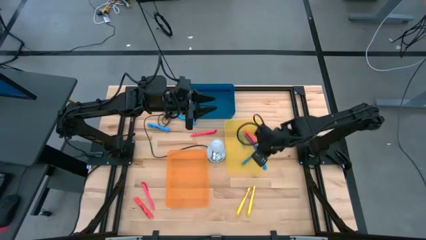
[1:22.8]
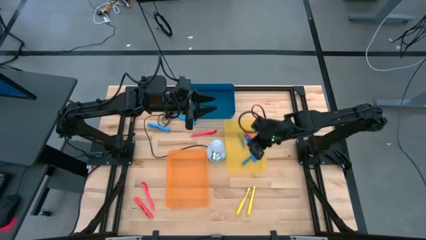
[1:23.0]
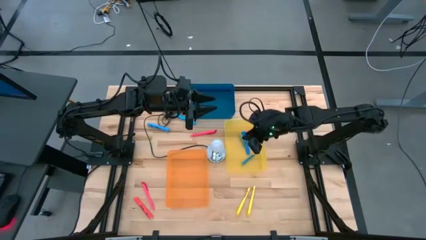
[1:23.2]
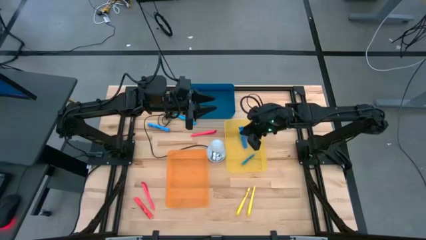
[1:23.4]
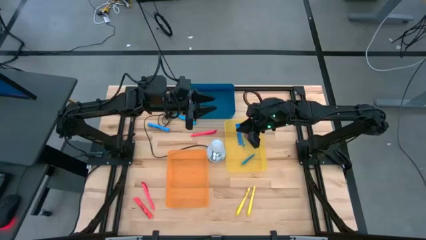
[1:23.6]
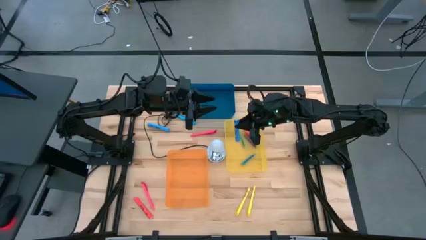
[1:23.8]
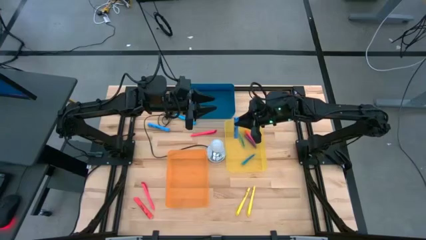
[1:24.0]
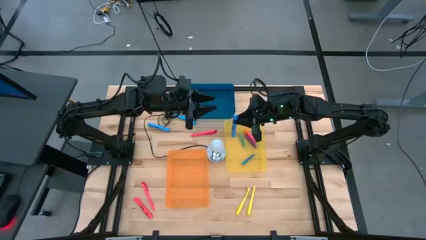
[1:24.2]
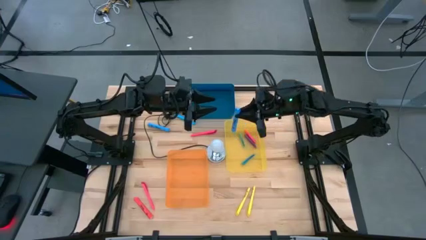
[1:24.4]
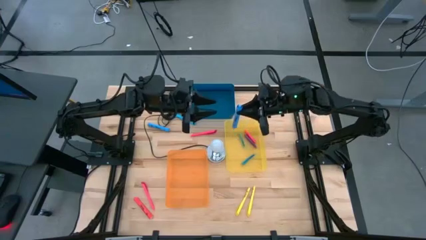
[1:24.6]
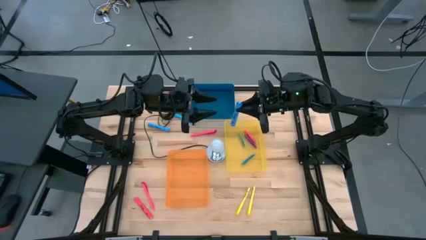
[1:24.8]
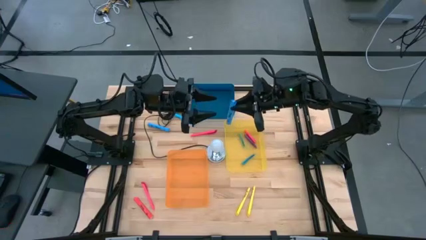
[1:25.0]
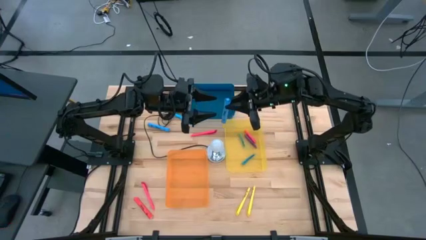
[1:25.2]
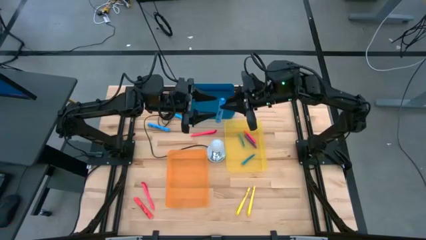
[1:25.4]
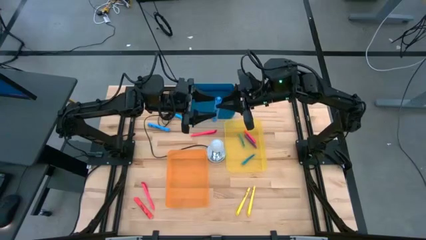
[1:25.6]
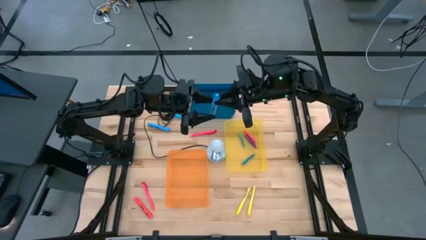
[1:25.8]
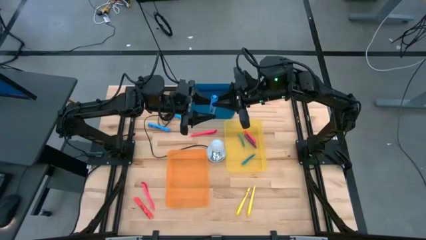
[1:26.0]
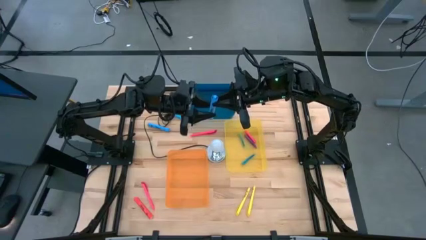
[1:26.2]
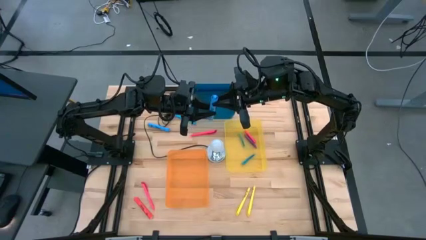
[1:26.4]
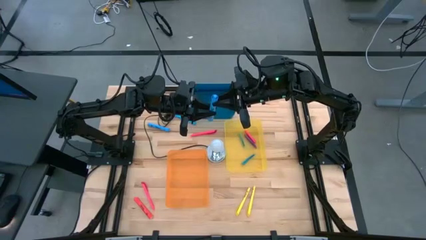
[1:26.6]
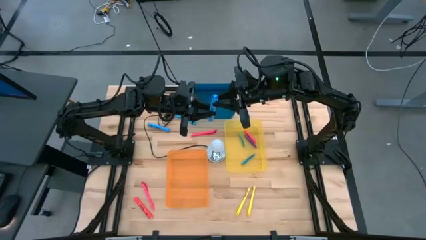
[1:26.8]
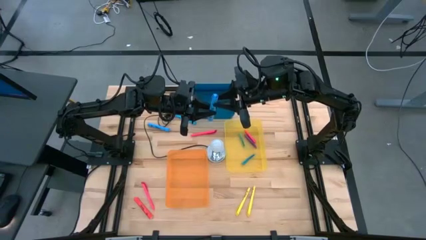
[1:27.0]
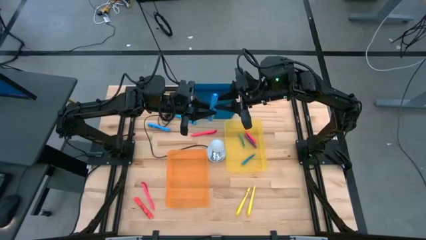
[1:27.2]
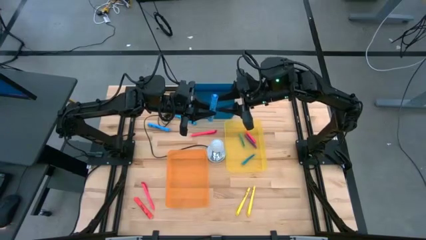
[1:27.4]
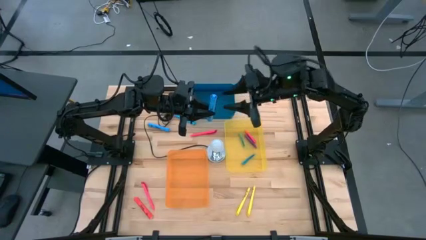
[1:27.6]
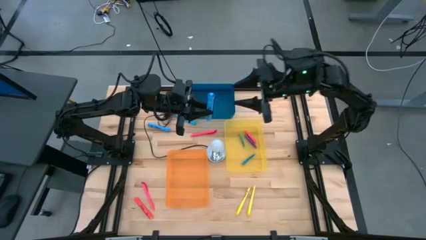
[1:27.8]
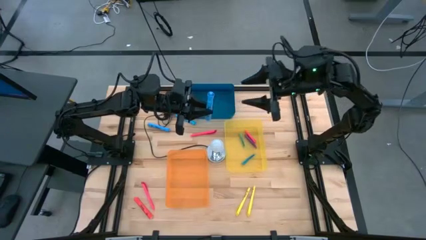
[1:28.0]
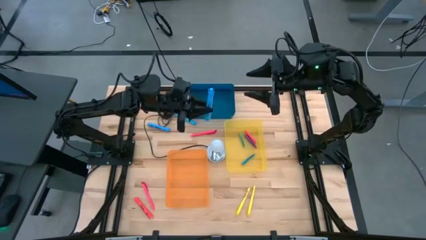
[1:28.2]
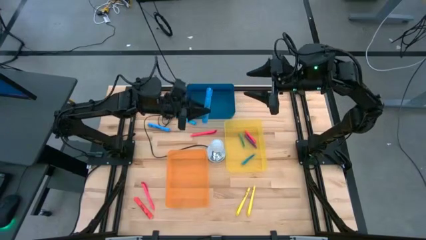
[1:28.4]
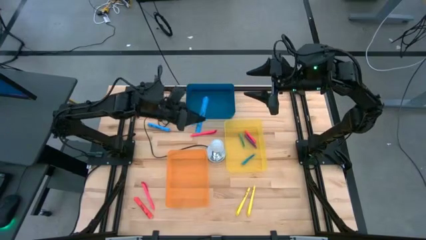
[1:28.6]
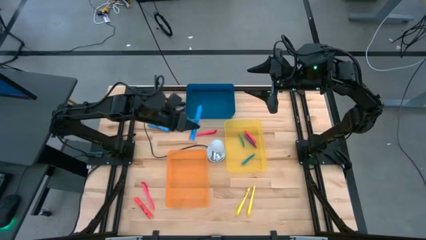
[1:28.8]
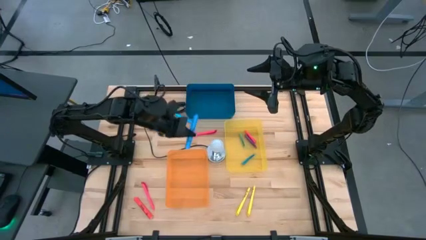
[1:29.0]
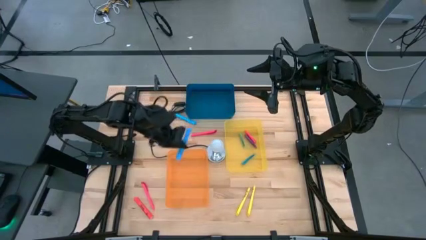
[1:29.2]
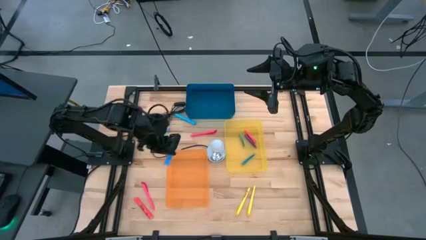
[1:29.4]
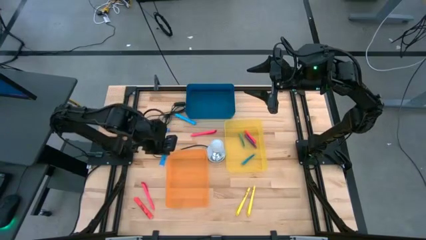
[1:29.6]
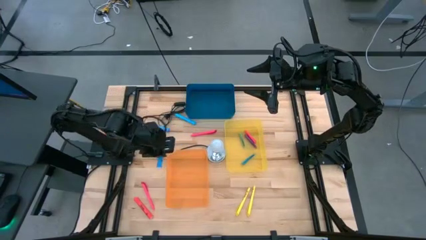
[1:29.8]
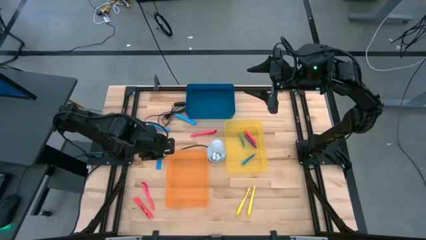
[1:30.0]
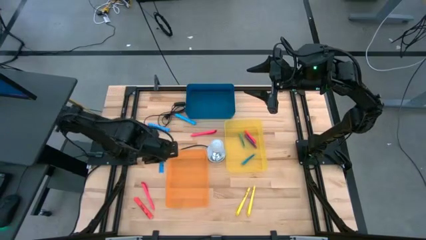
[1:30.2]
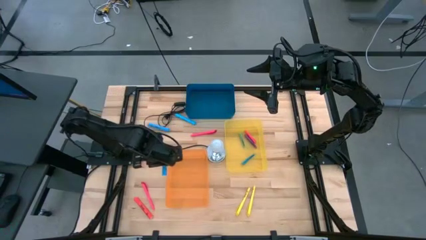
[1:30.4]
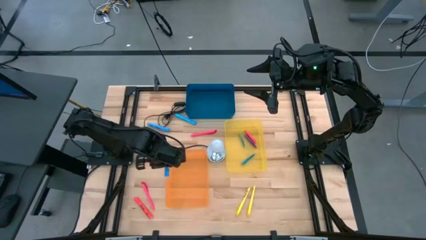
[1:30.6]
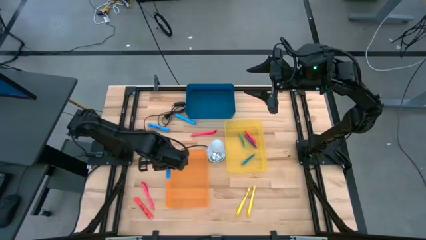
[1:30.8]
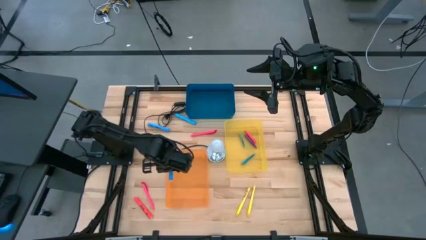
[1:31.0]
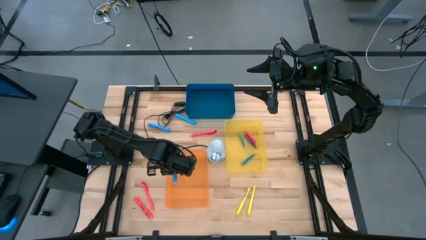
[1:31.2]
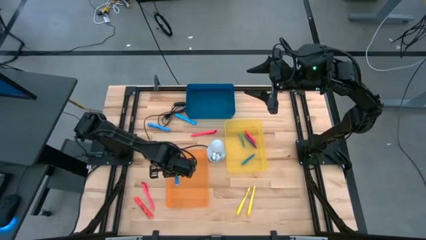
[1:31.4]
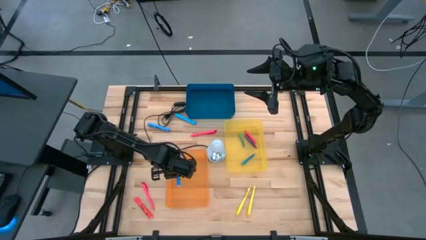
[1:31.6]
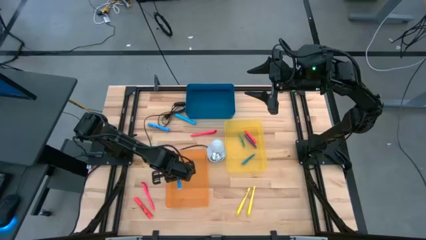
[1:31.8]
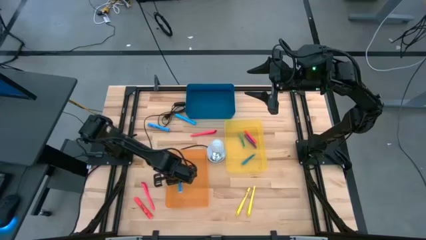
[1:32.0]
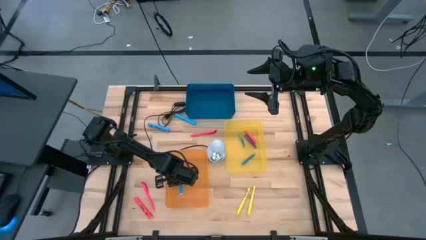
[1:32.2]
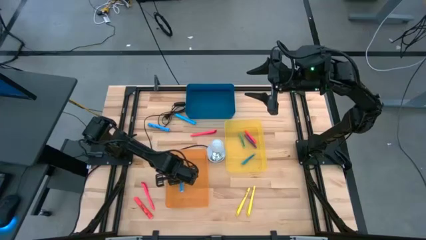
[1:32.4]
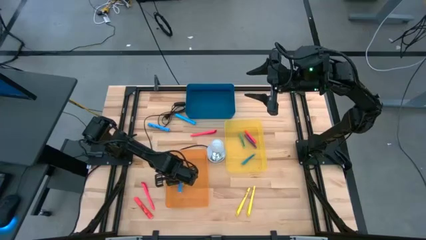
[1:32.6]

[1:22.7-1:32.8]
Task: Pick & Place Markers
Put the bottom blue highlighter pen into the orange bin
